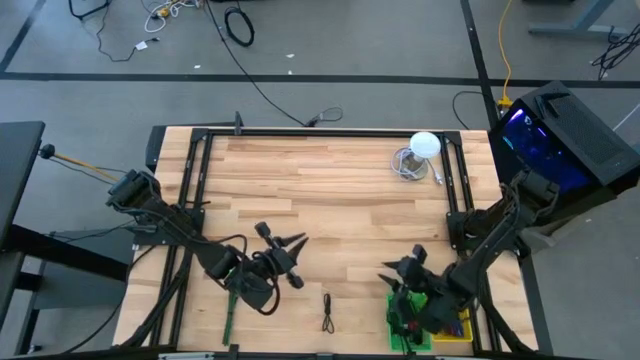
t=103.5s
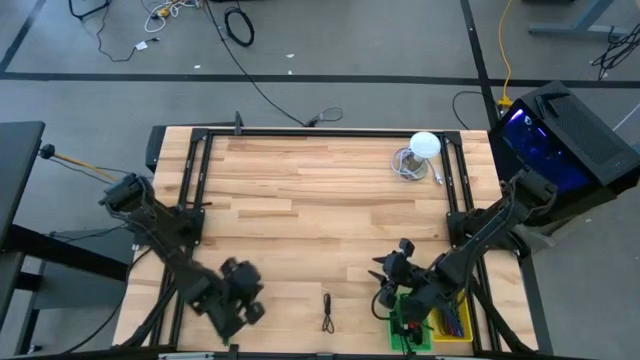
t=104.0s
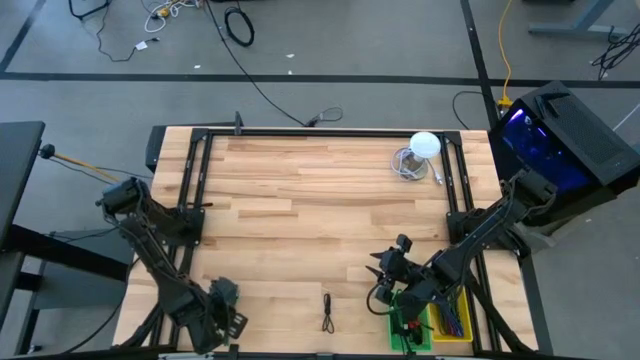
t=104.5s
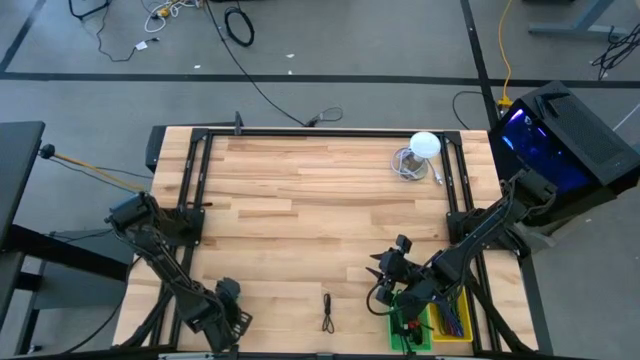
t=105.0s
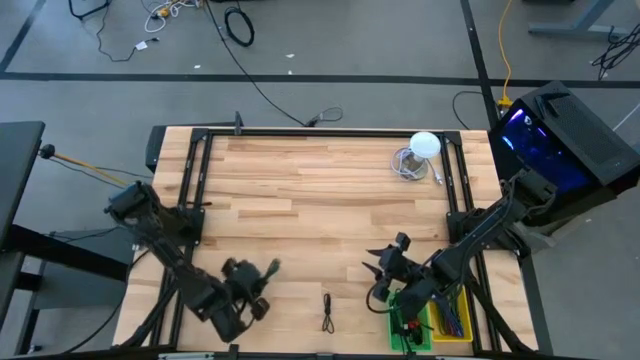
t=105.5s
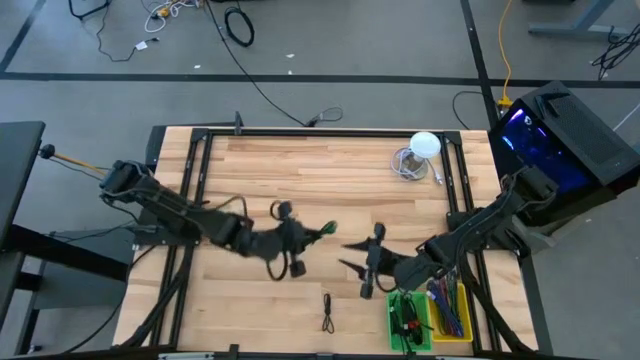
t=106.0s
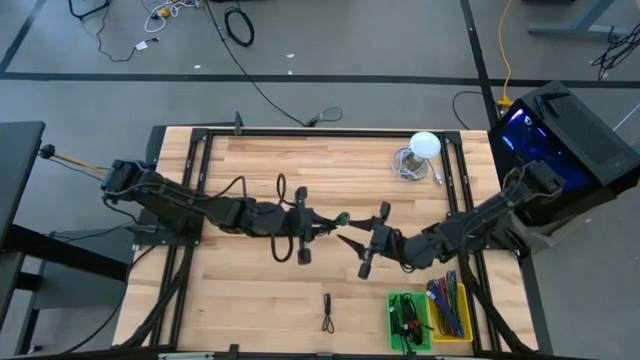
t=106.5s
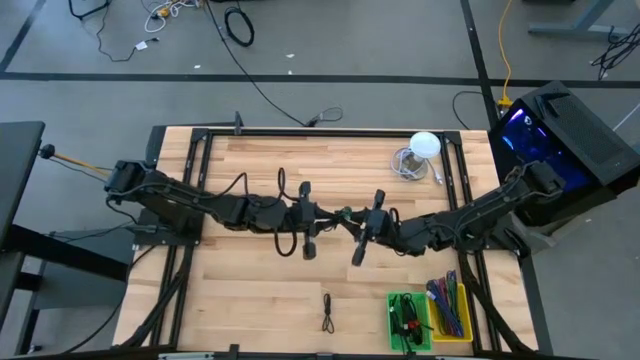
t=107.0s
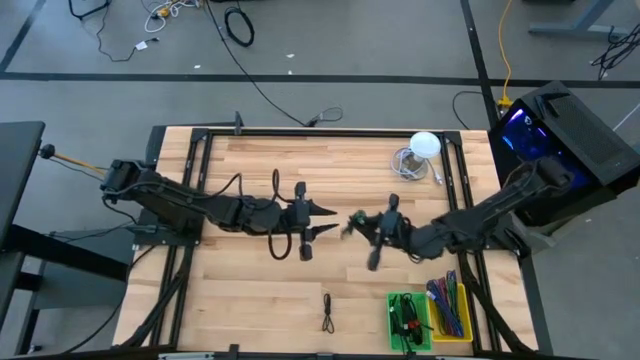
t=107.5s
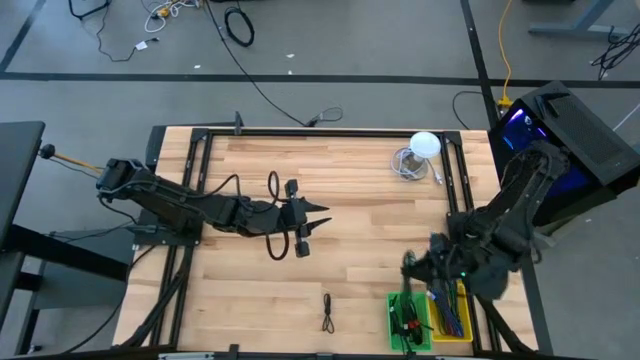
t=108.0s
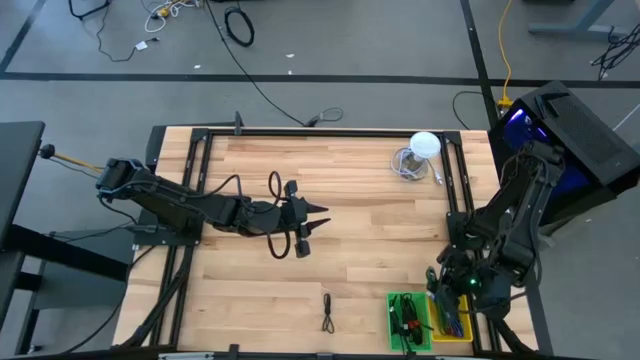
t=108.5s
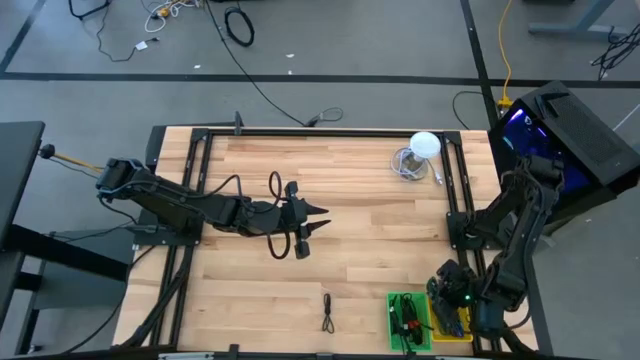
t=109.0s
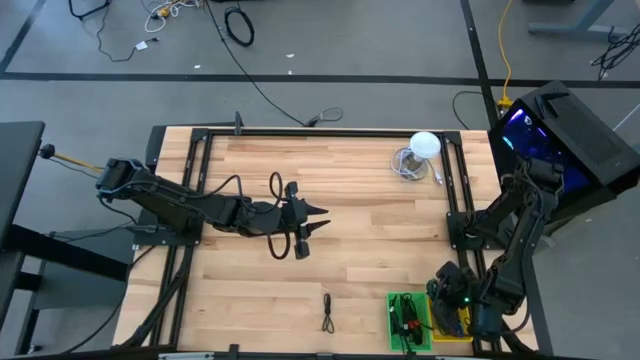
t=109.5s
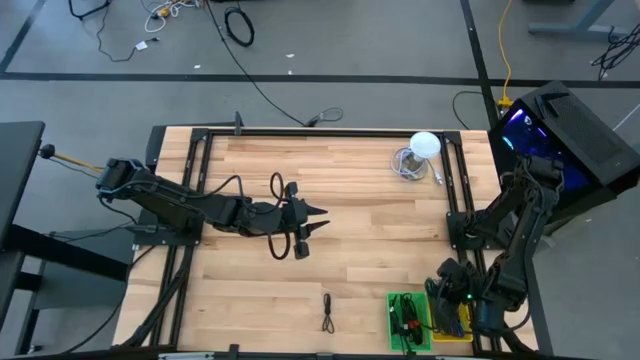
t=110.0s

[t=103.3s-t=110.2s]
Task: Pick & Place USB Port
Put the green and black charger cable into the yellow basket

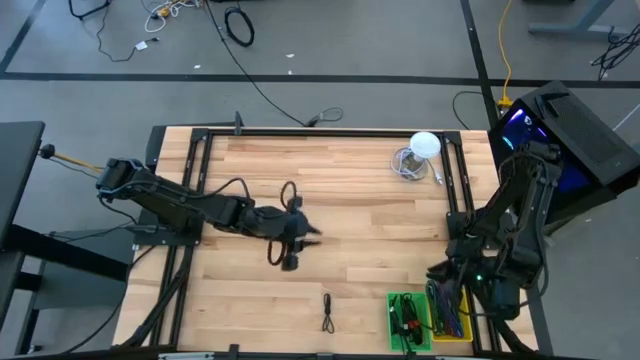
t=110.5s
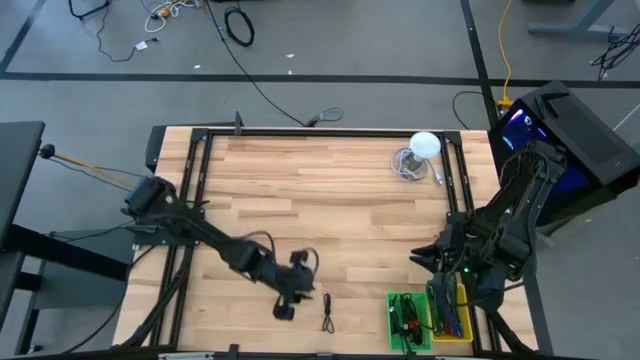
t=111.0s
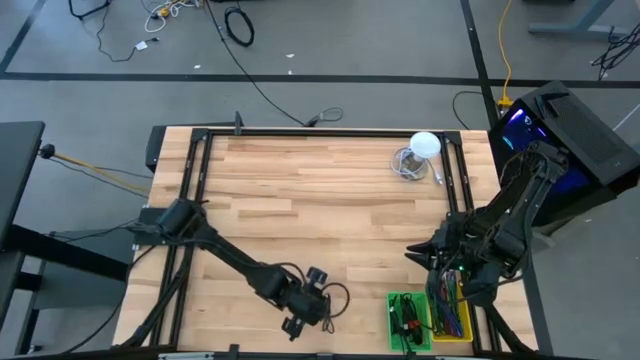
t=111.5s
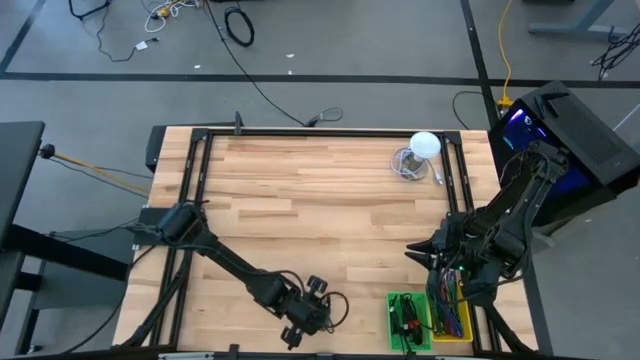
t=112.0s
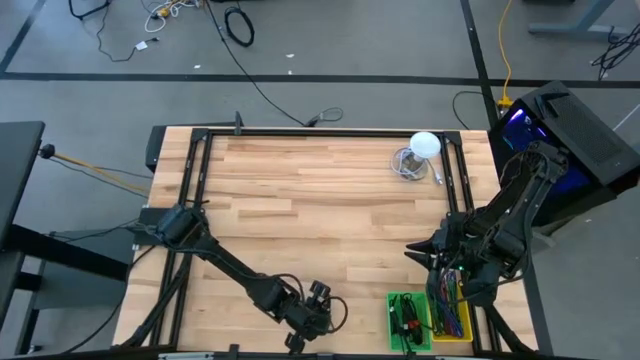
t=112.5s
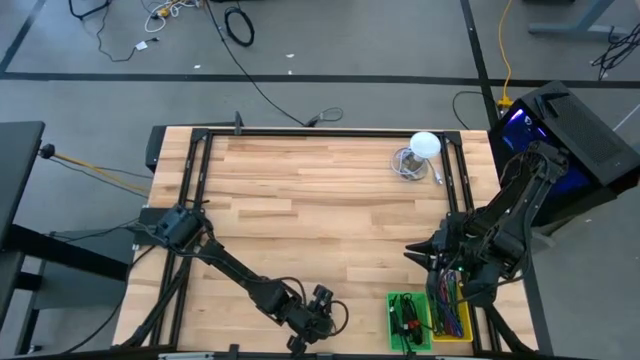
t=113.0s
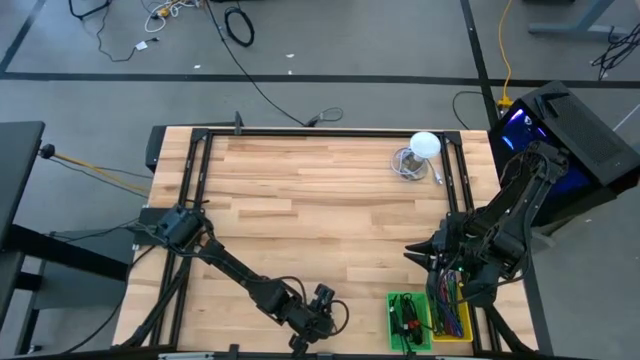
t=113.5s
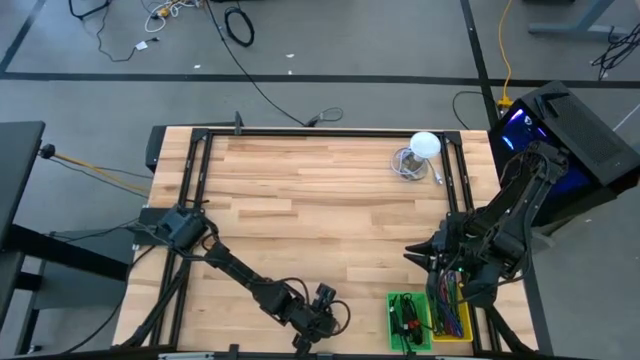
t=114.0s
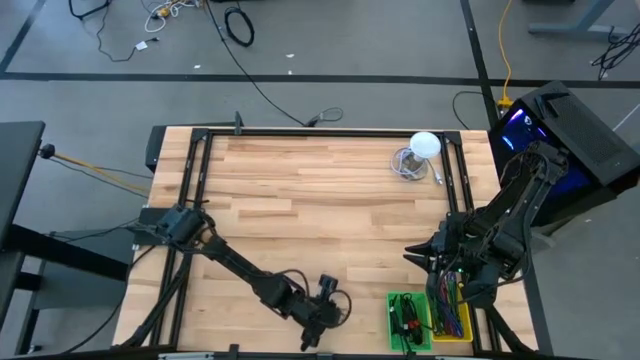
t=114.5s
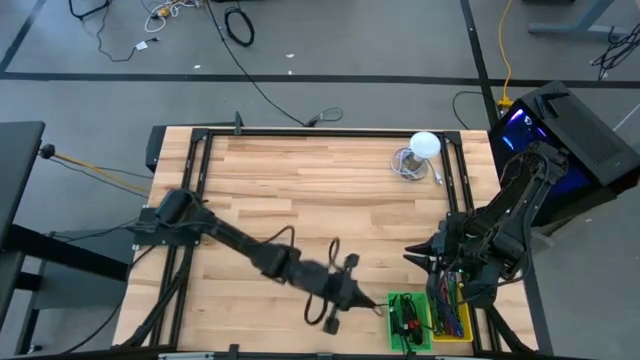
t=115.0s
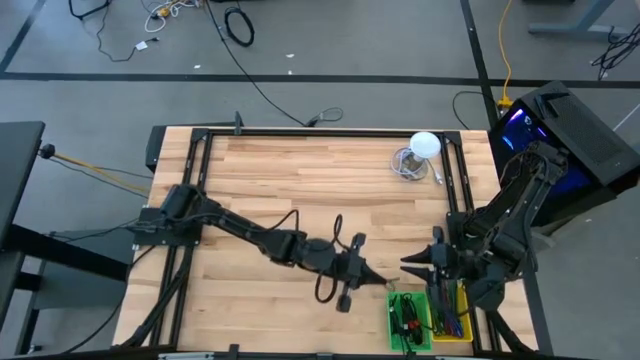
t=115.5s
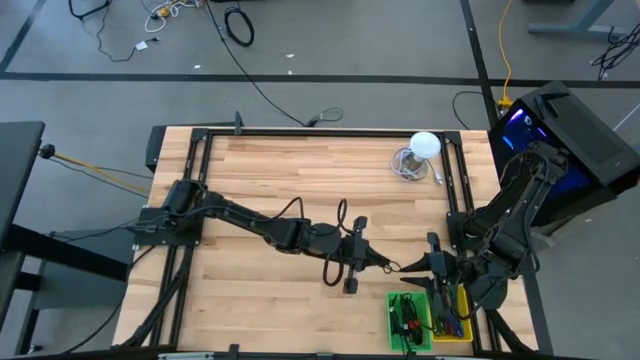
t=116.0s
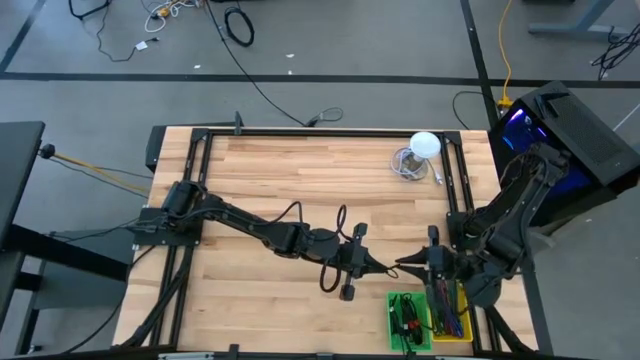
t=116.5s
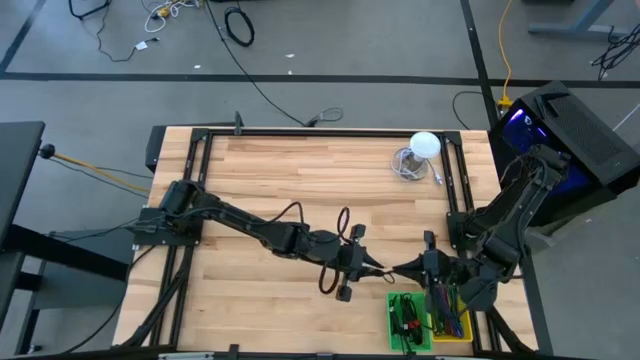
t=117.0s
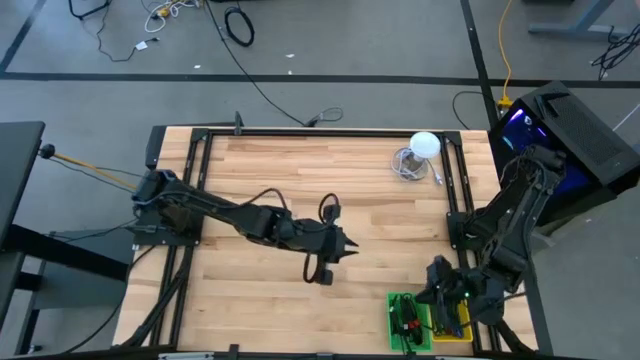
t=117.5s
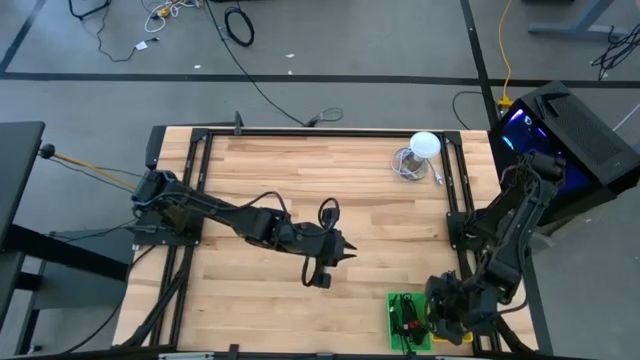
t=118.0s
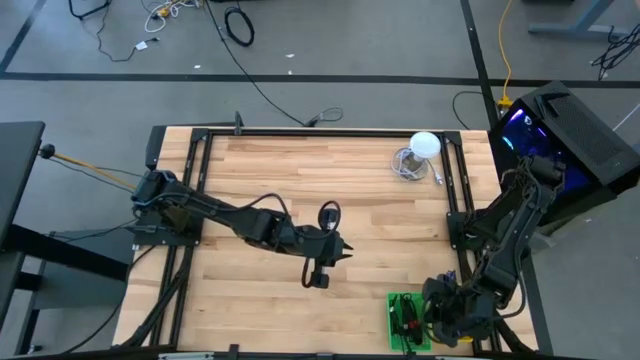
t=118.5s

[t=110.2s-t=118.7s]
Put the black charger cable into the green basket

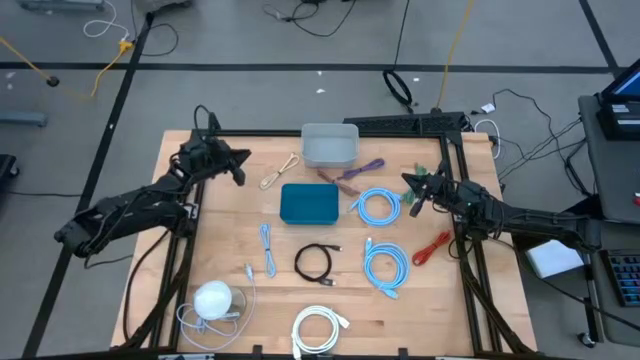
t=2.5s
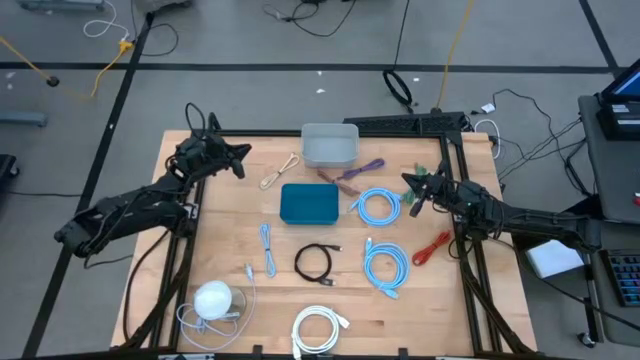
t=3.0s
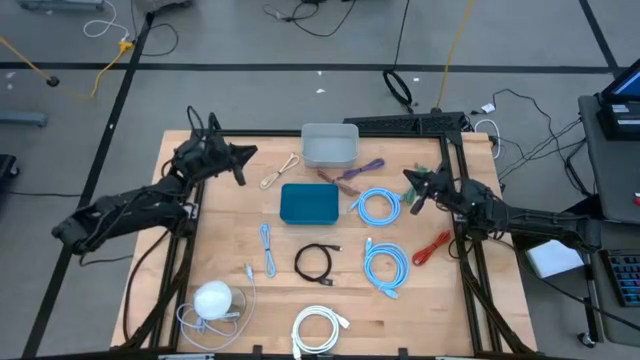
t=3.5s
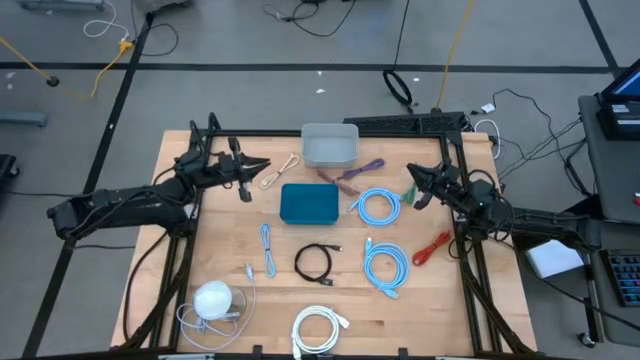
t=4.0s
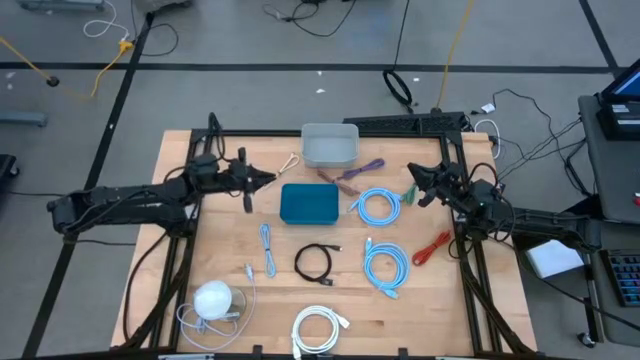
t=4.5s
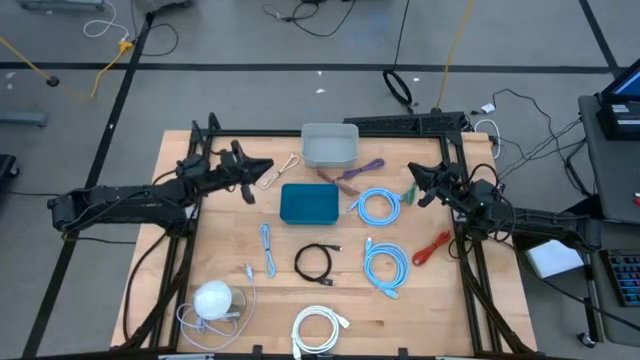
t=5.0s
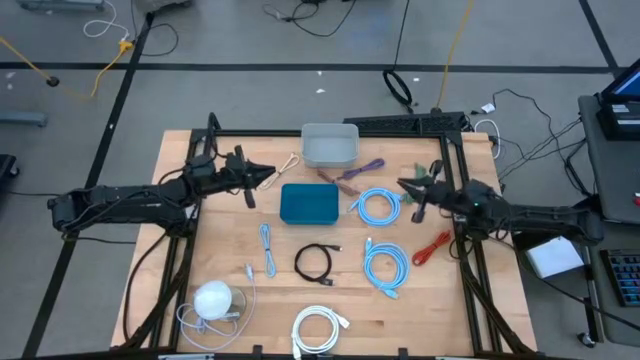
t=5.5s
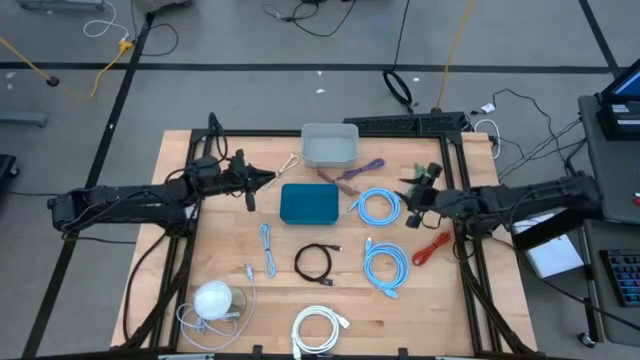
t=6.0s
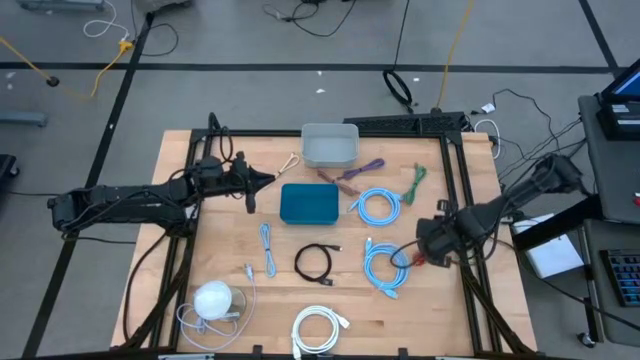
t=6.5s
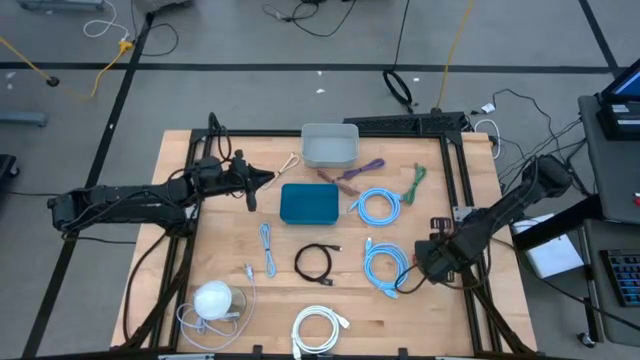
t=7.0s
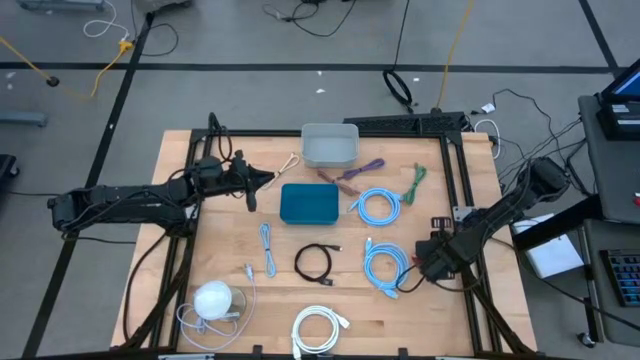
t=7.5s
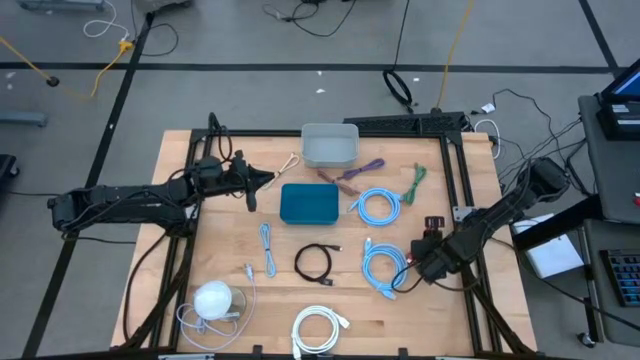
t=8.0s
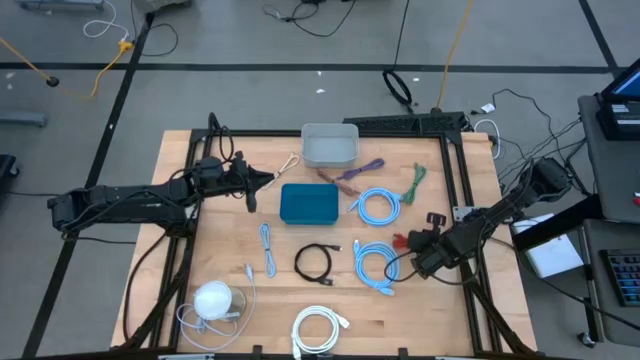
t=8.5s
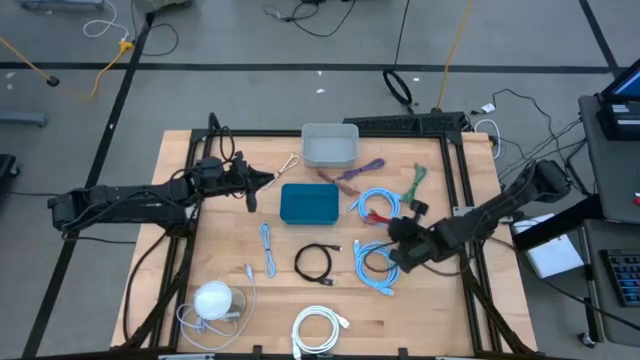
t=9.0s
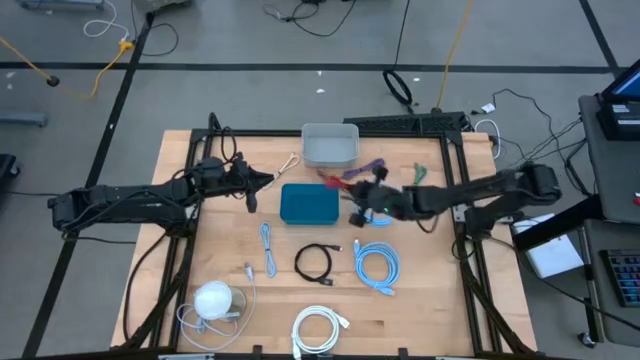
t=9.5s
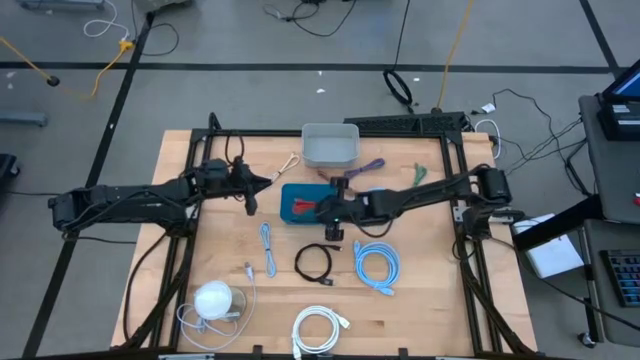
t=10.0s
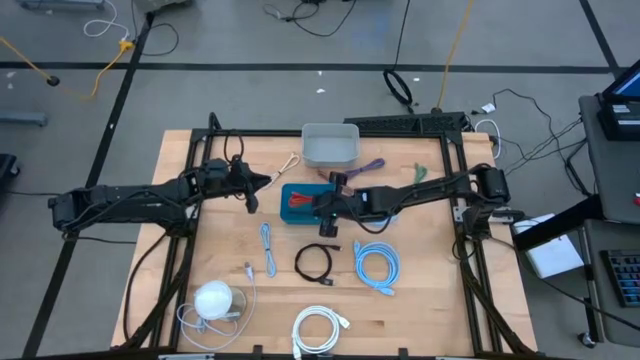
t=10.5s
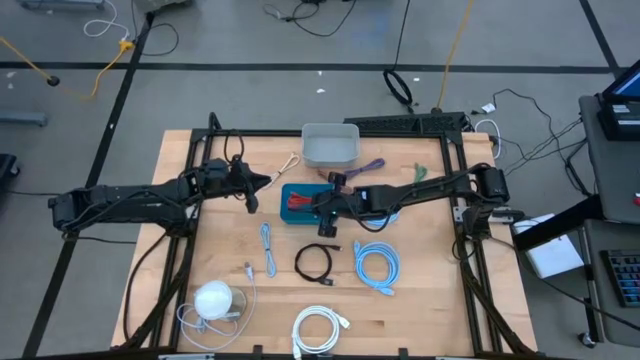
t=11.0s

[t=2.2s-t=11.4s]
Task: Pick & Place USB Port
Put the red charger cable into the blue bin
